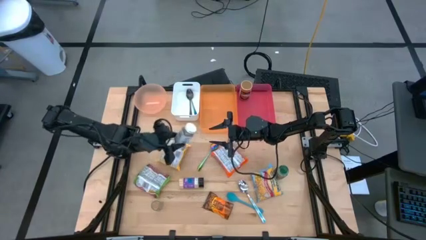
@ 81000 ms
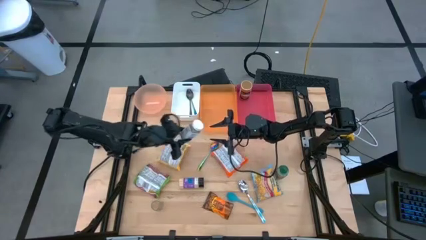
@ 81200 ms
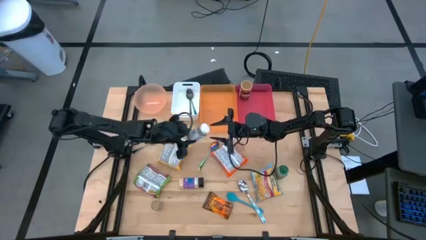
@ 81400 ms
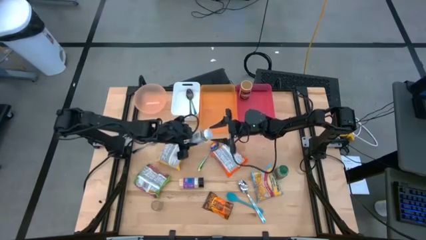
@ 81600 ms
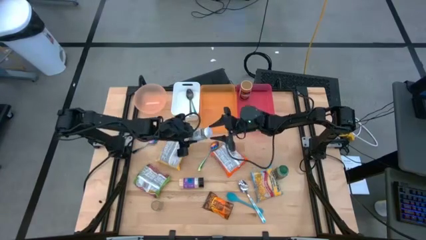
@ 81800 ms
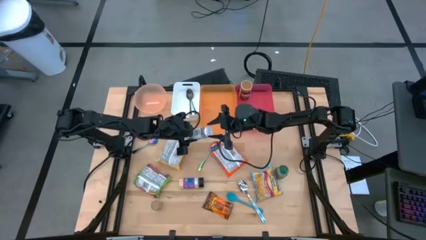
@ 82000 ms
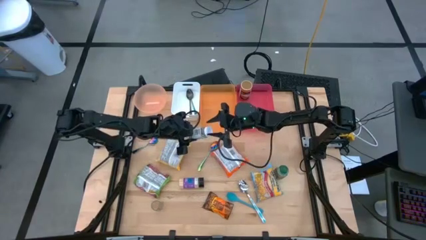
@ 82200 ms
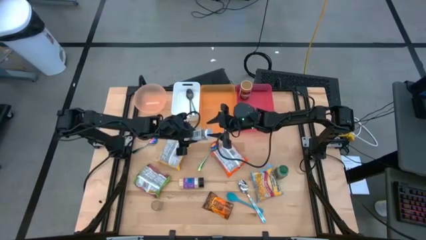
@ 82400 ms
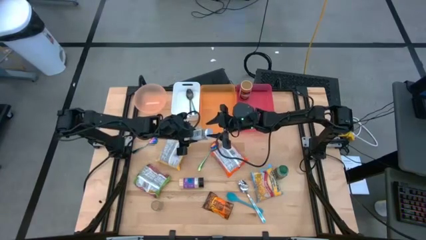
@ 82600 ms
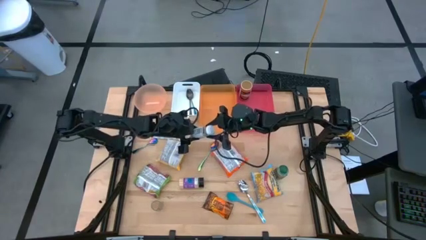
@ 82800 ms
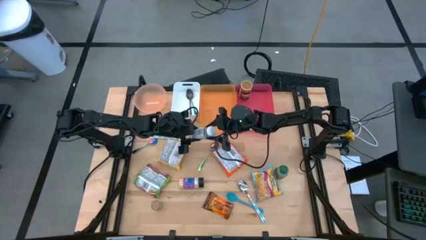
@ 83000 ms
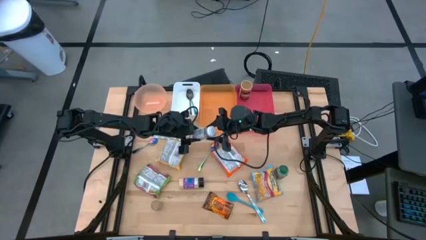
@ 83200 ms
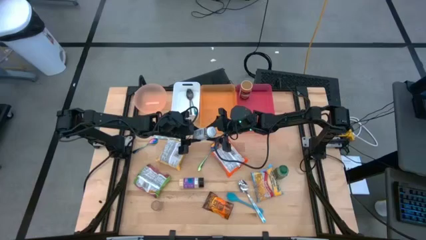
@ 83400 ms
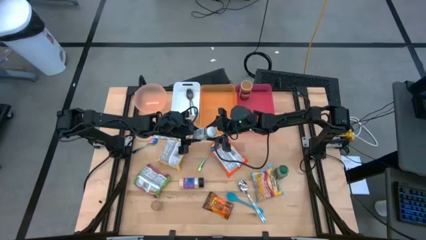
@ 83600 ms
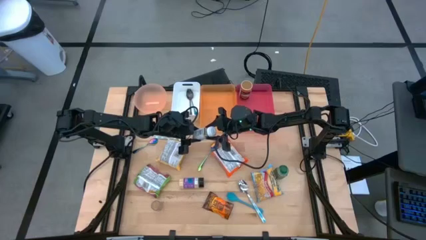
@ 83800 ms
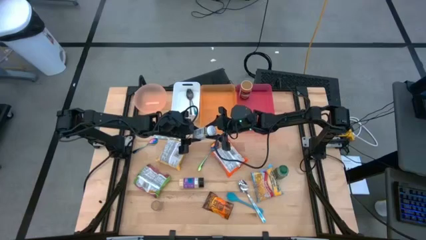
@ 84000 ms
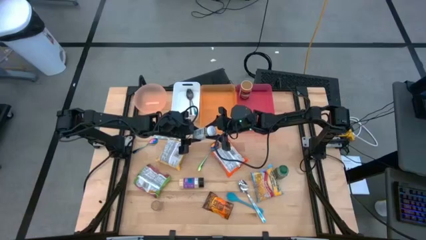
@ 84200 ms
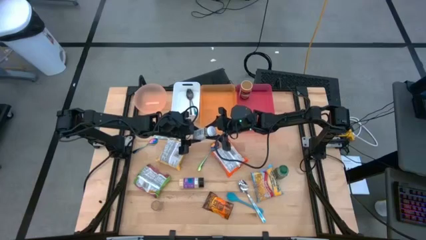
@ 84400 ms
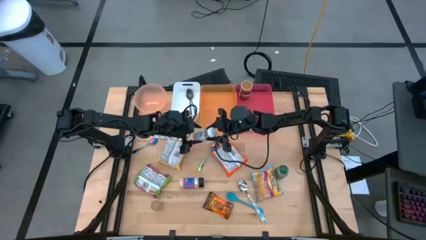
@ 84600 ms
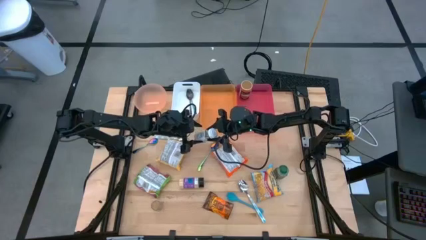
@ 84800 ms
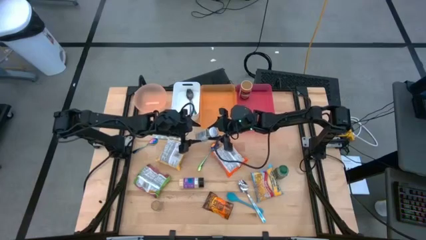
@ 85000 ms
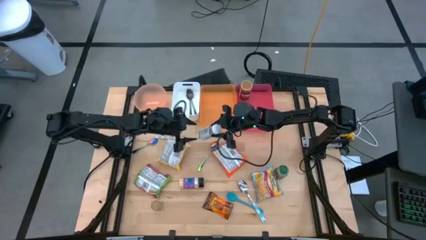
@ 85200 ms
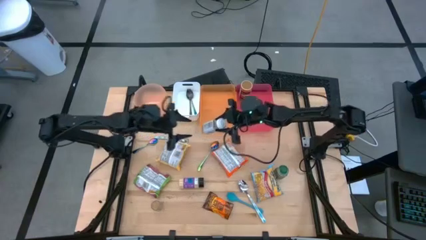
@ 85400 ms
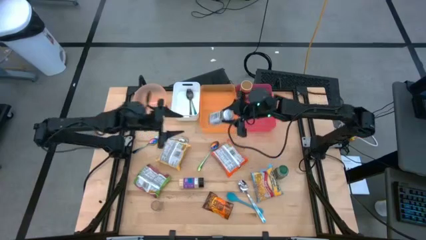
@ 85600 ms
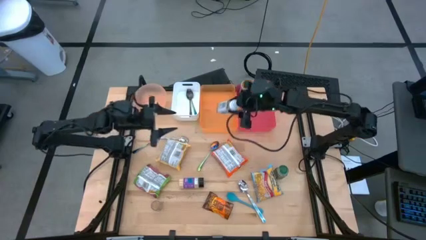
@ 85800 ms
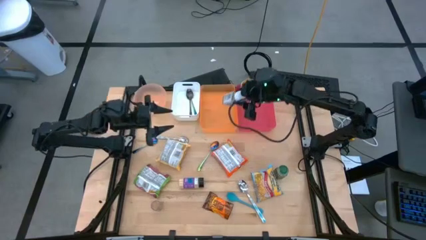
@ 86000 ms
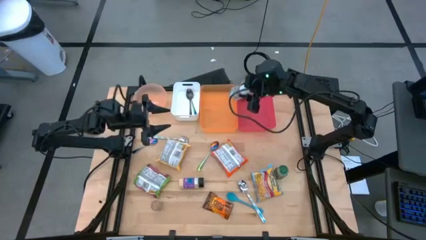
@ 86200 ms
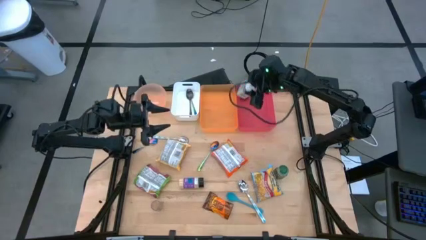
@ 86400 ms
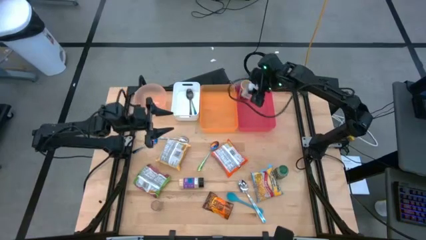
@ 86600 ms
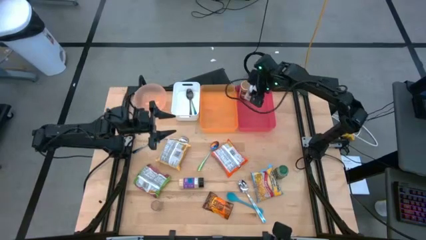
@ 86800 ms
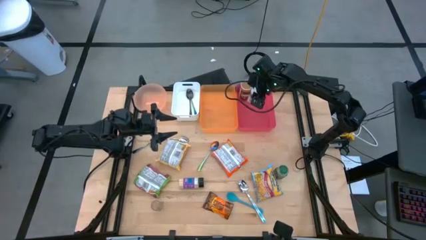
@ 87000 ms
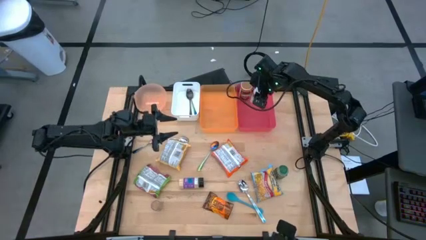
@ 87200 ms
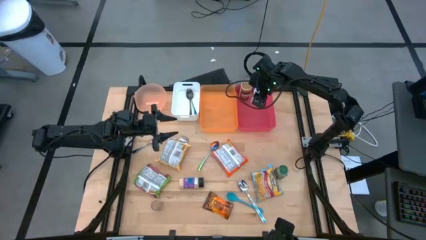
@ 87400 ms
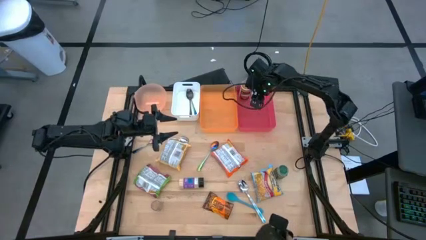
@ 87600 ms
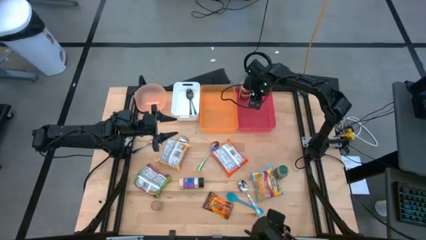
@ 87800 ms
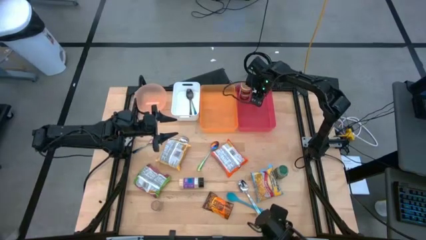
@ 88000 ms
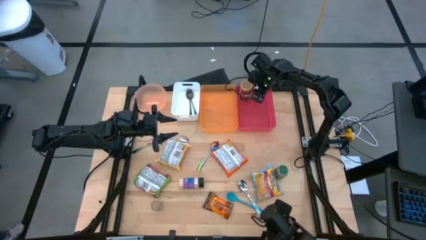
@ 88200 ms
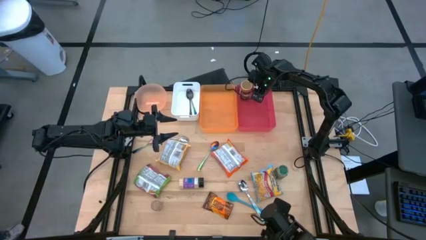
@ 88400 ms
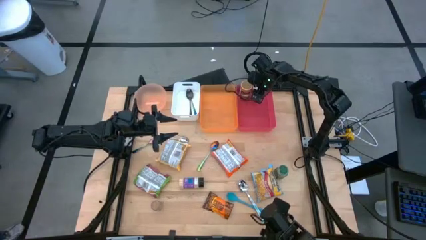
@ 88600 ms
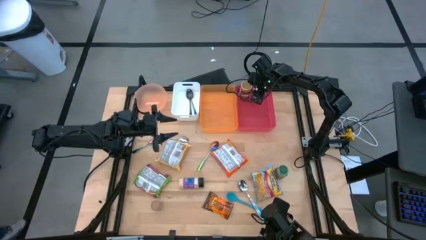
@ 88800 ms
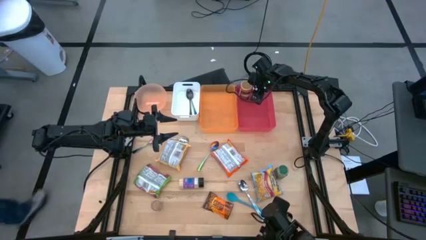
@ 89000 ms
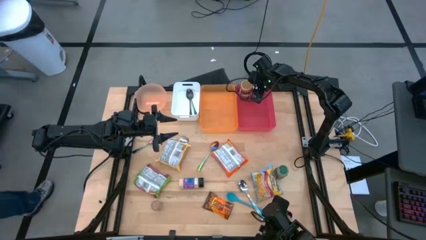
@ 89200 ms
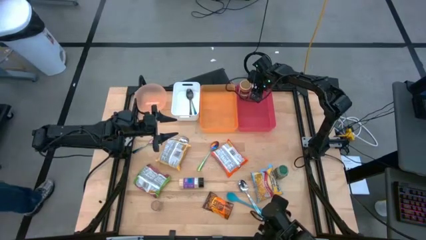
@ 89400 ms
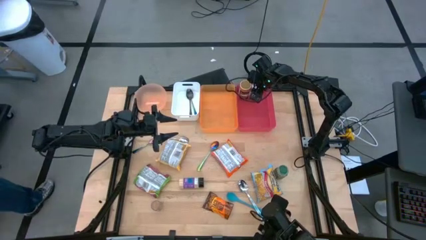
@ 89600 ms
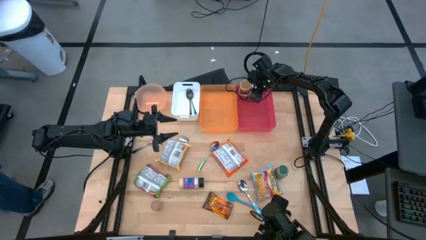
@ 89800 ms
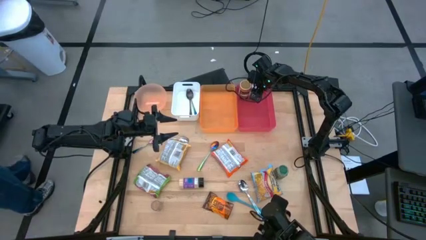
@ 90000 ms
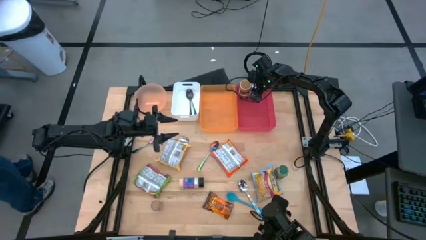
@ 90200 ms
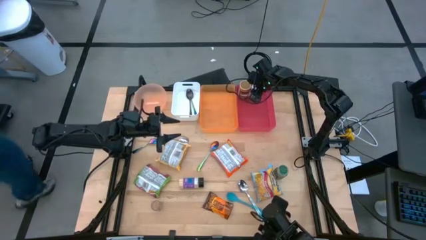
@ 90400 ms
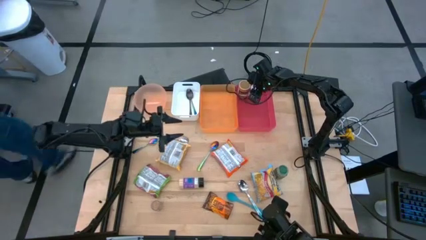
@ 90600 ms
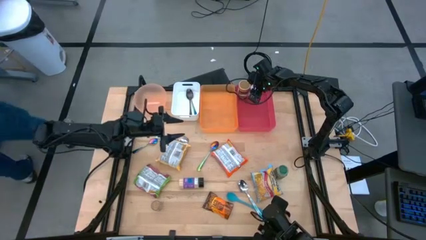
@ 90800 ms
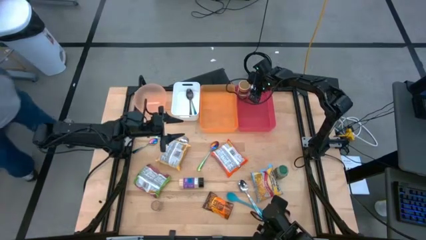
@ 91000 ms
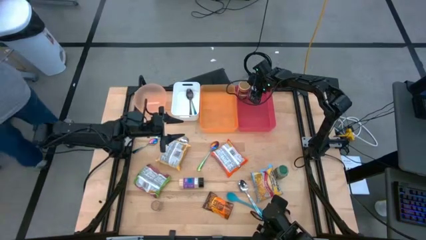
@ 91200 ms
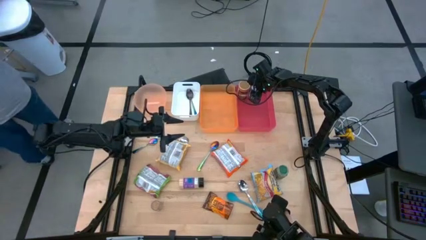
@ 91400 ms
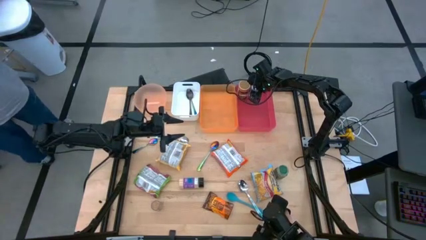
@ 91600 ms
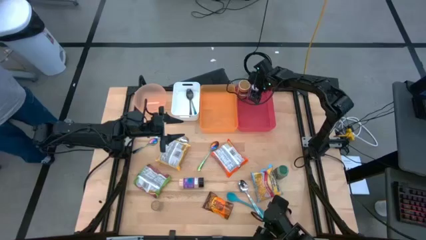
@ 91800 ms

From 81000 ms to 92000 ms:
Task: Pick & Place Food Item
Put the white seasoning bottle into the red bin

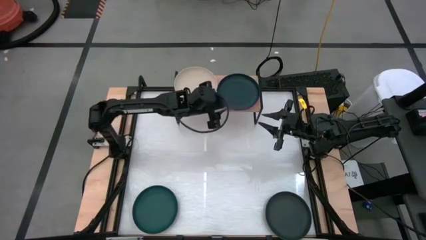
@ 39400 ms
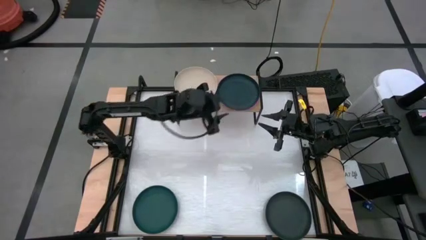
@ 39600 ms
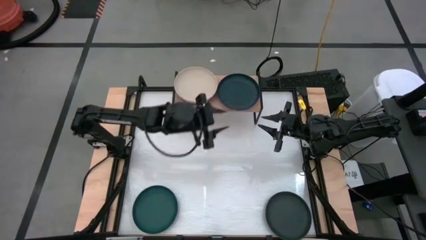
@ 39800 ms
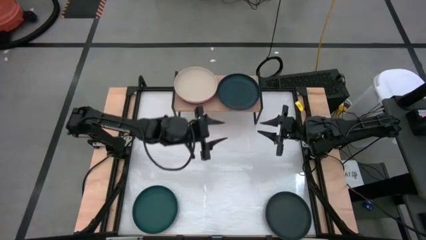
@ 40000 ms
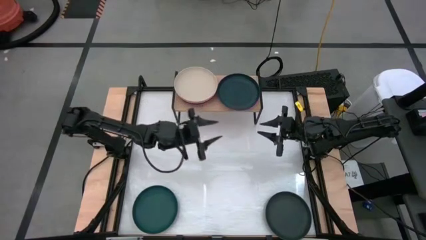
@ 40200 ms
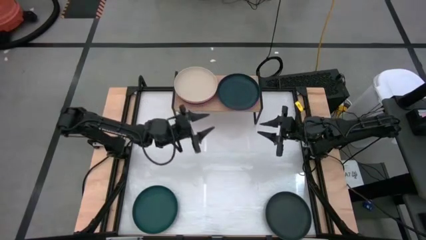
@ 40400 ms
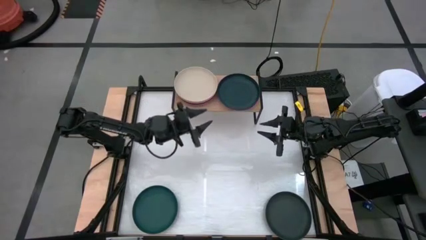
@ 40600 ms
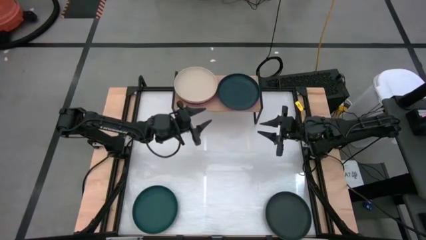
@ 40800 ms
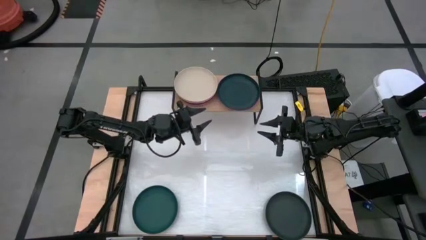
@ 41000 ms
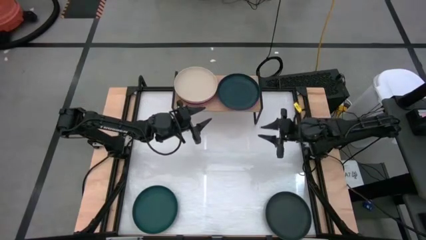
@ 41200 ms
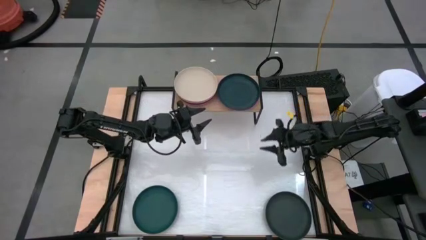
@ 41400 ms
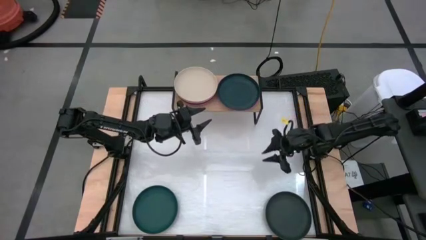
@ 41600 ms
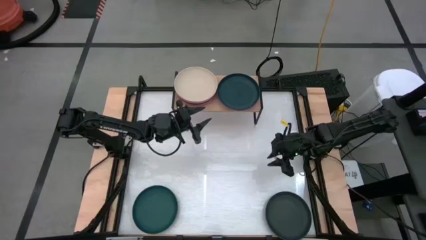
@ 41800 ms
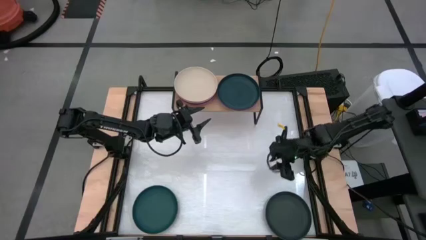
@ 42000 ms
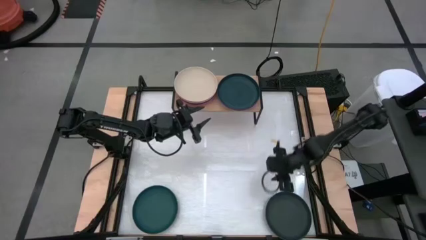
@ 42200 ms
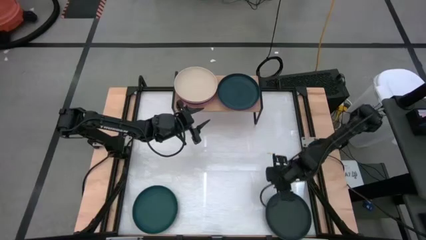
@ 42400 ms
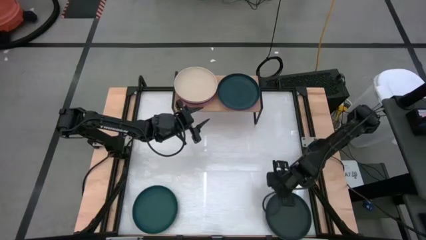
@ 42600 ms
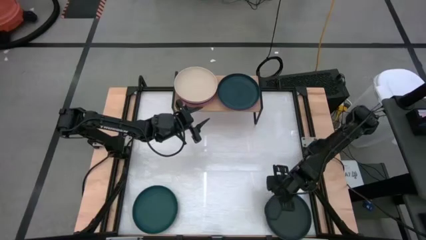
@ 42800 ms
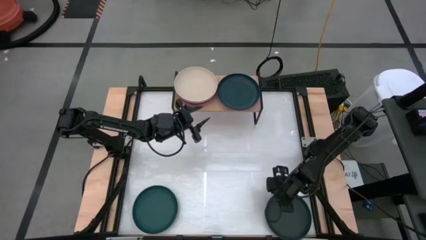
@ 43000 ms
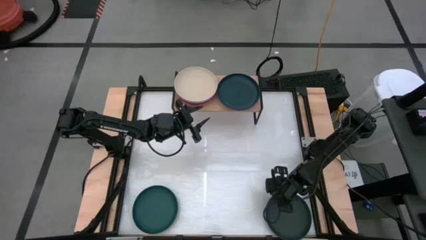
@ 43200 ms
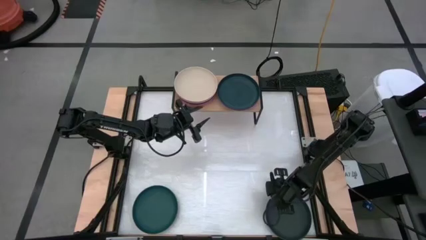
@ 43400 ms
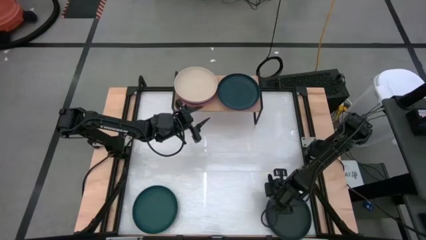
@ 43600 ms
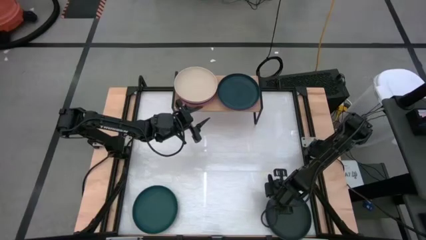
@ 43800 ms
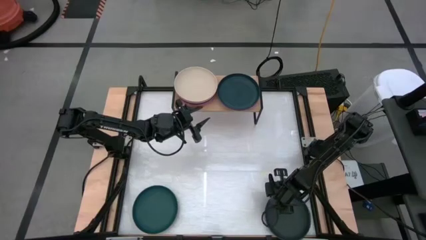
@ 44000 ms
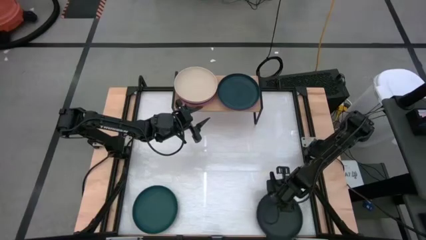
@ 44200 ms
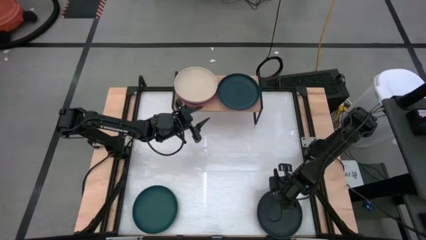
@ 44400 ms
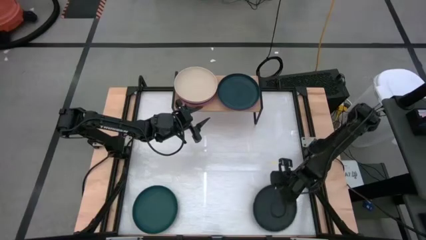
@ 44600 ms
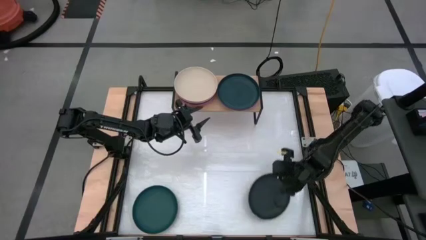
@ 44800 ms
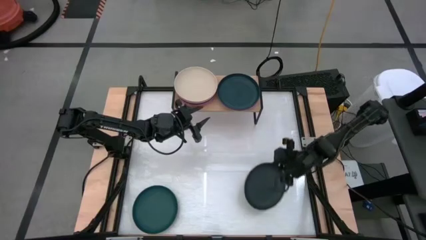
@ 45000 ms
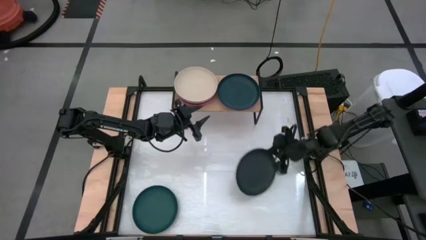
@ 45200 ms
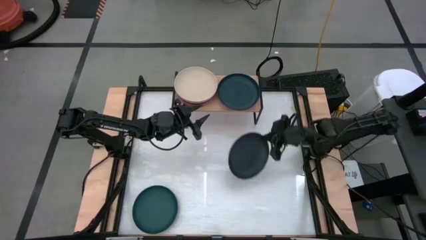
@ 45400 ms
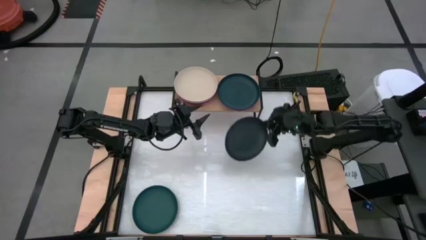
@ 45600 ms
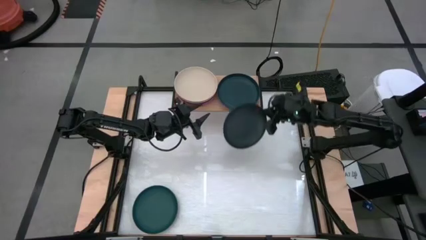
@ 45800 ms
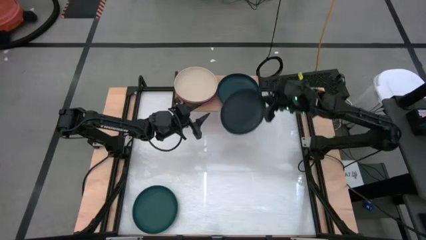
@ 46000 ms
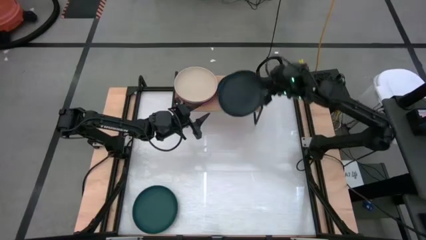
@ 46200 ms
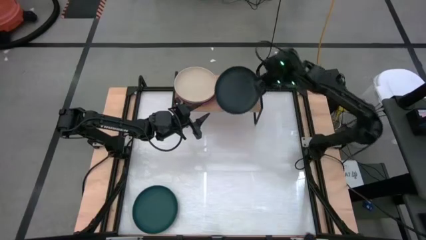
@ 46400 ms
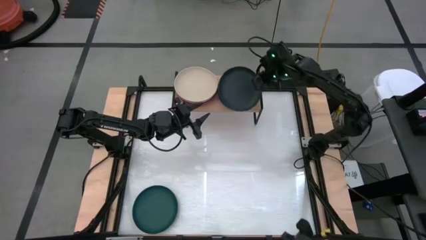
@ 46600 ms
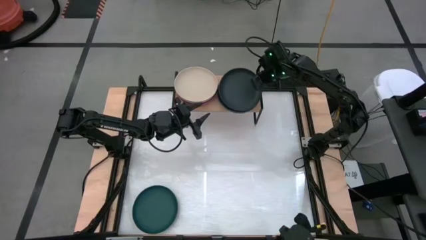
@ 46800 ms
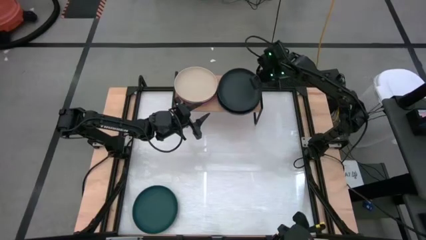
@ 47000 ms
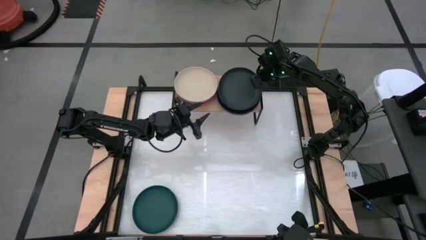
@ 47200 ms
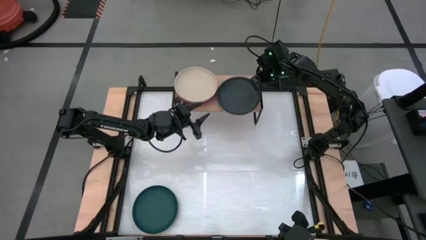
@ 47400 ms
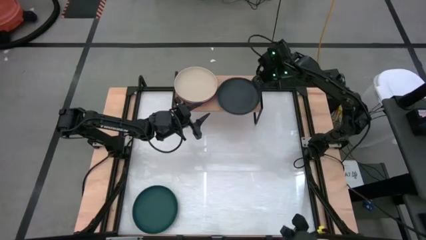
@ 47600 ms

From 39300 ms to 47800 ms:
Task: Place and stack plates onto a shelf
Stack the black plate on top of the dark green plate on the shelf
